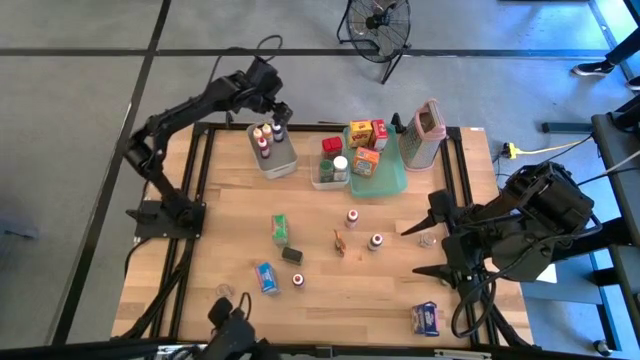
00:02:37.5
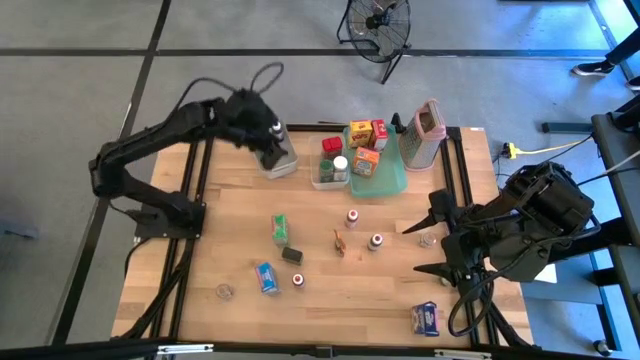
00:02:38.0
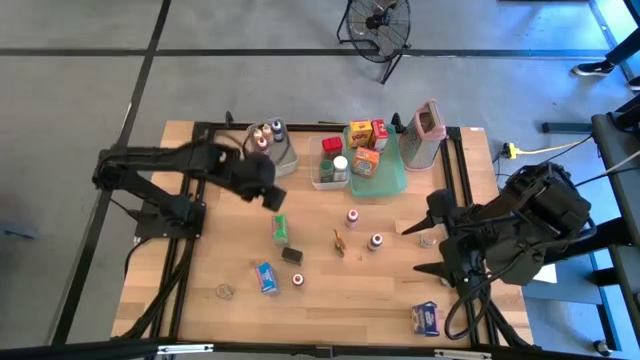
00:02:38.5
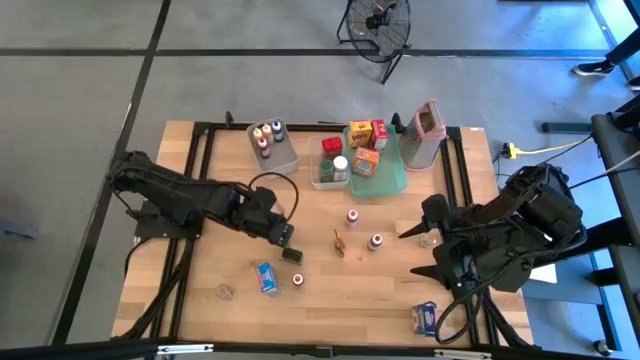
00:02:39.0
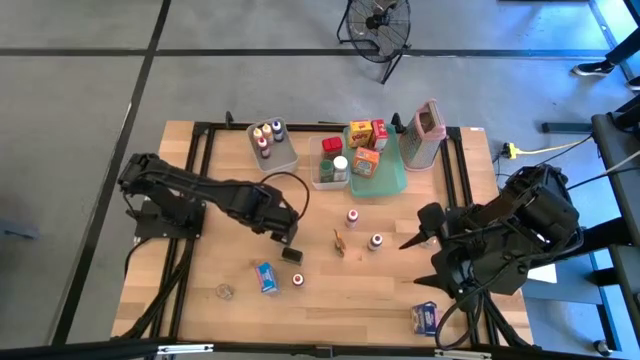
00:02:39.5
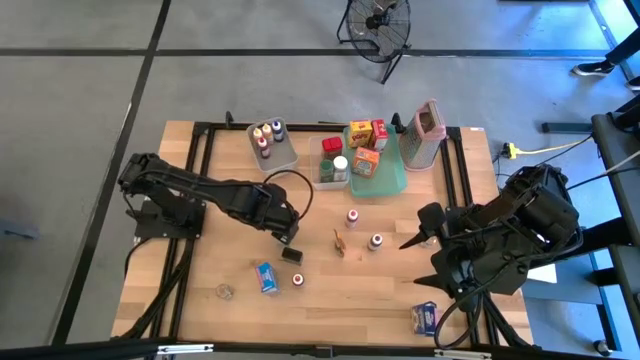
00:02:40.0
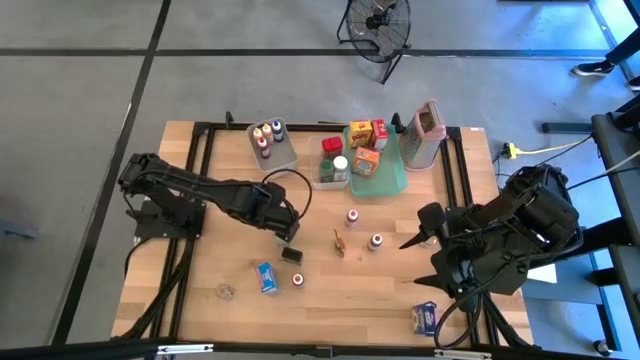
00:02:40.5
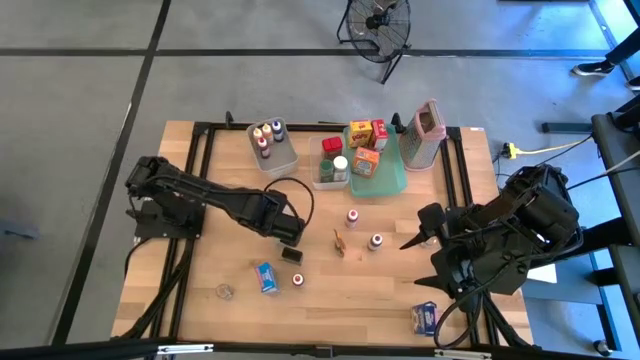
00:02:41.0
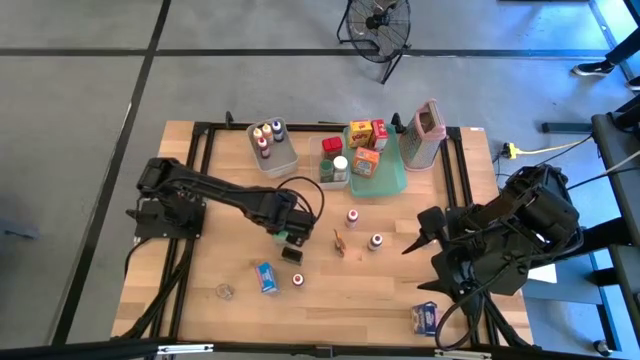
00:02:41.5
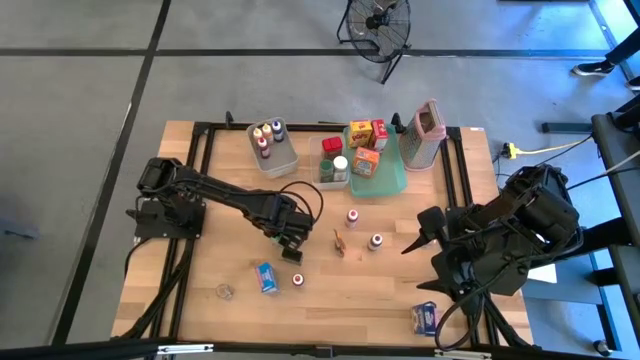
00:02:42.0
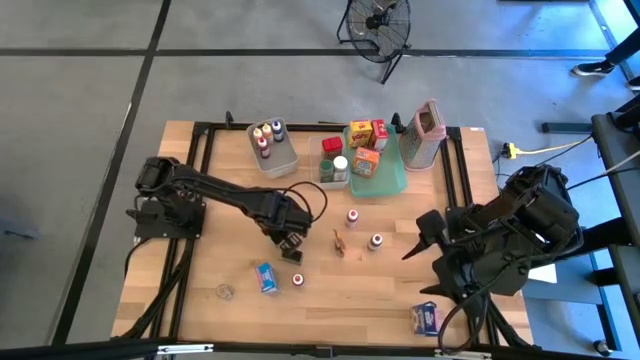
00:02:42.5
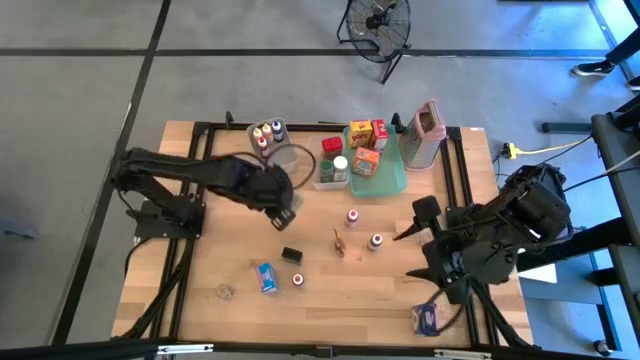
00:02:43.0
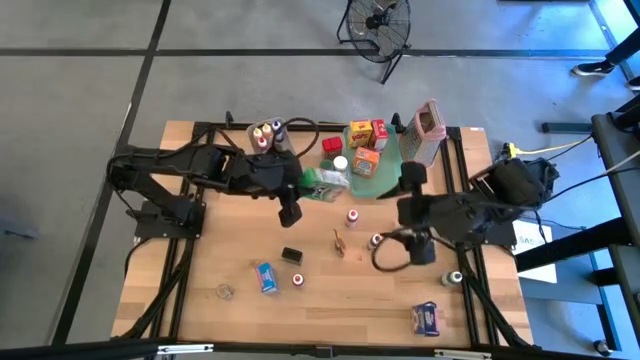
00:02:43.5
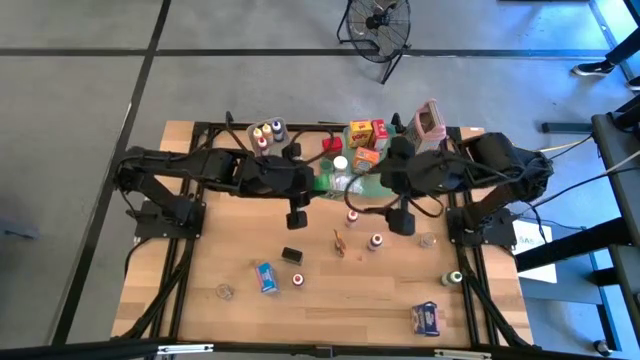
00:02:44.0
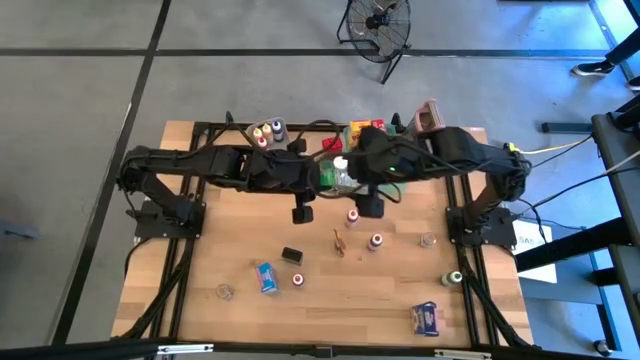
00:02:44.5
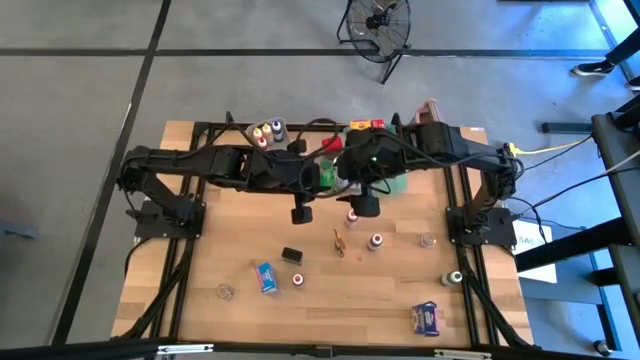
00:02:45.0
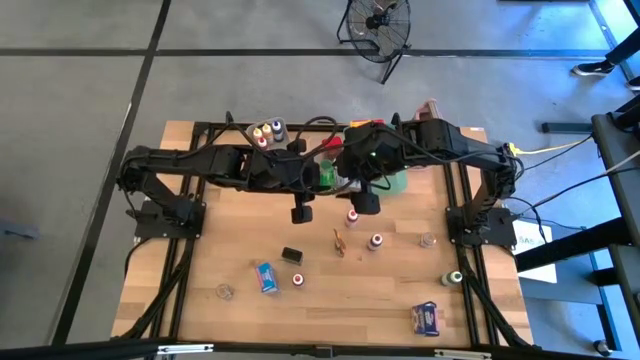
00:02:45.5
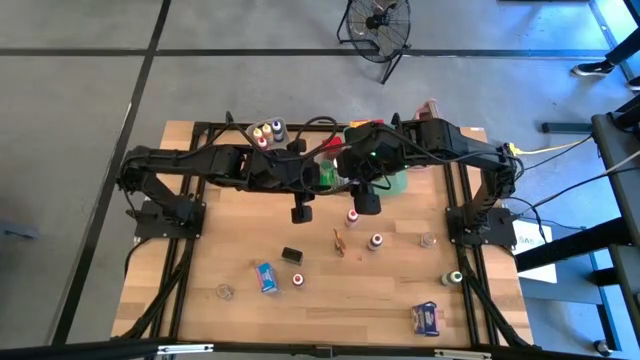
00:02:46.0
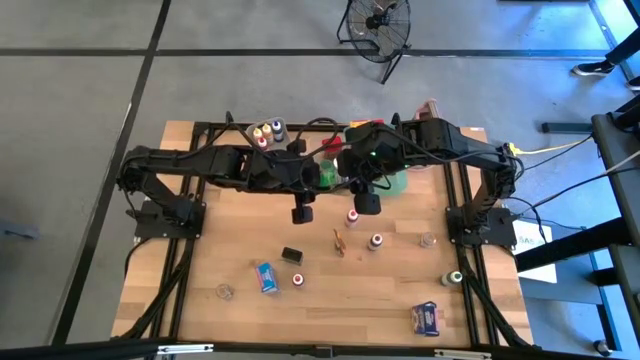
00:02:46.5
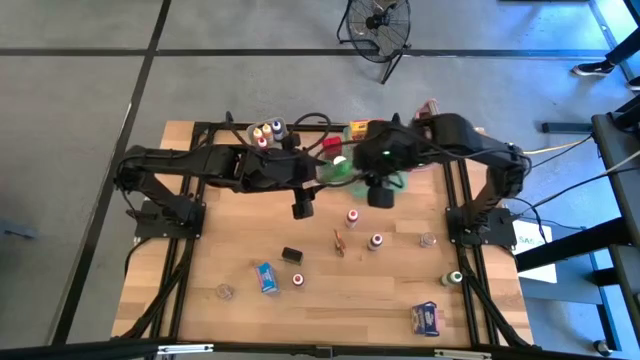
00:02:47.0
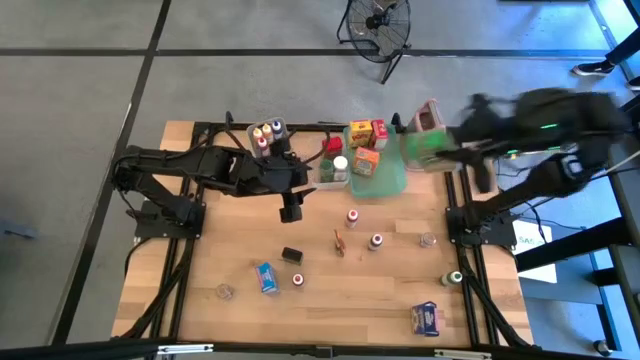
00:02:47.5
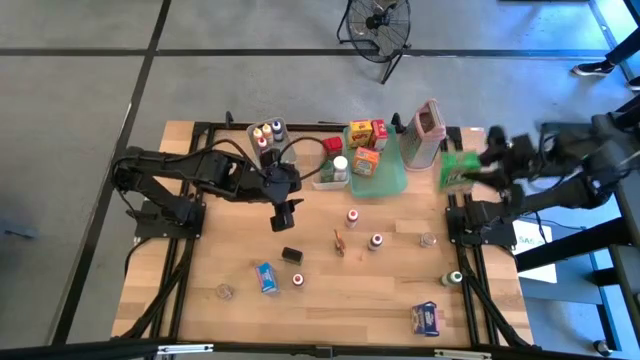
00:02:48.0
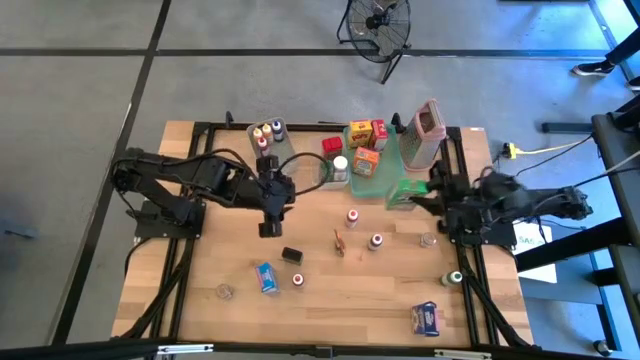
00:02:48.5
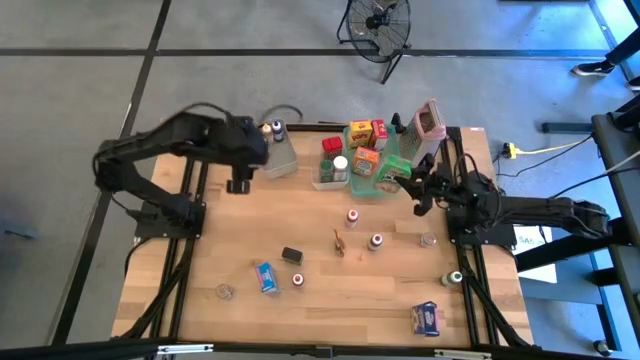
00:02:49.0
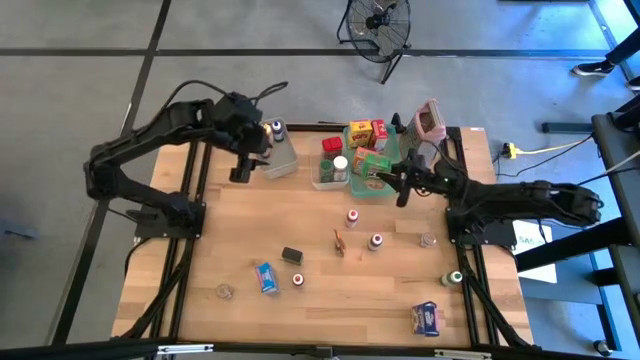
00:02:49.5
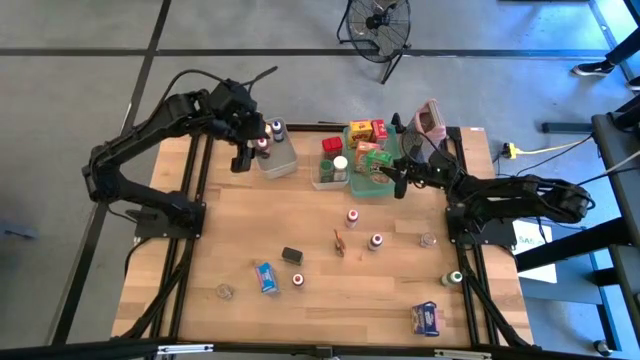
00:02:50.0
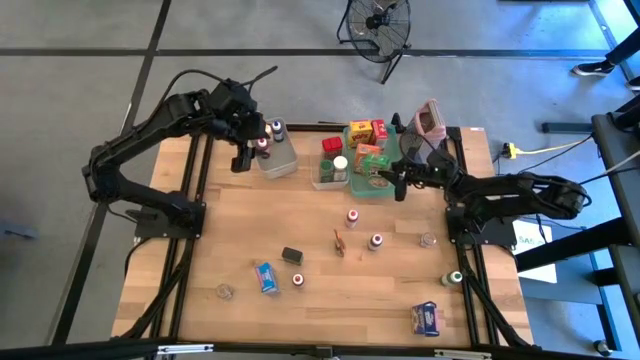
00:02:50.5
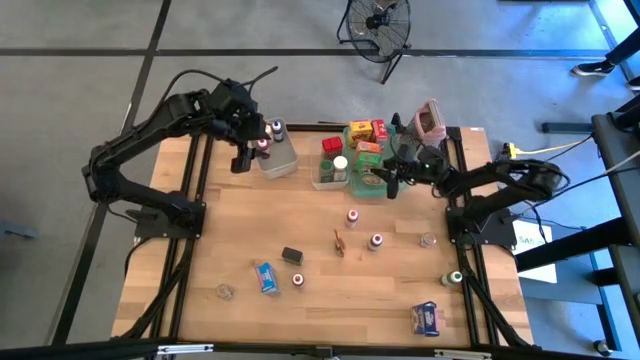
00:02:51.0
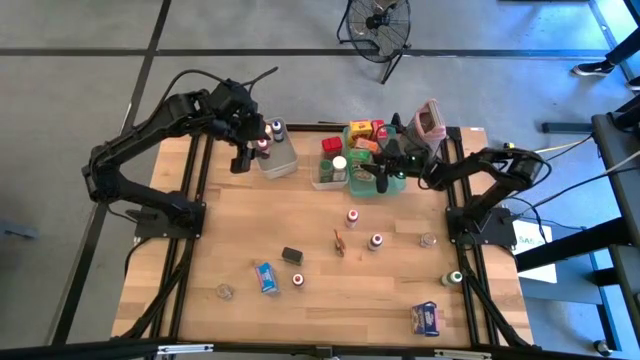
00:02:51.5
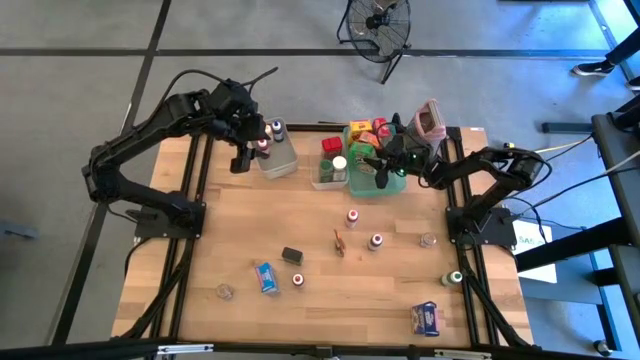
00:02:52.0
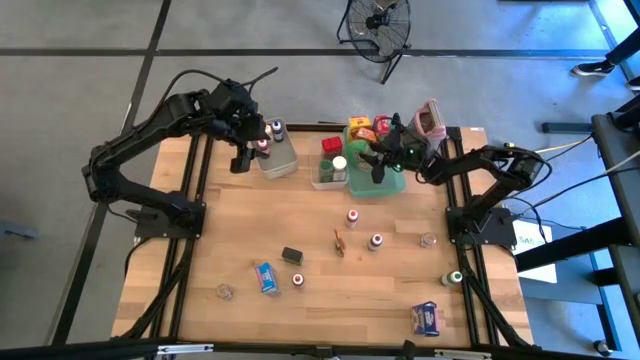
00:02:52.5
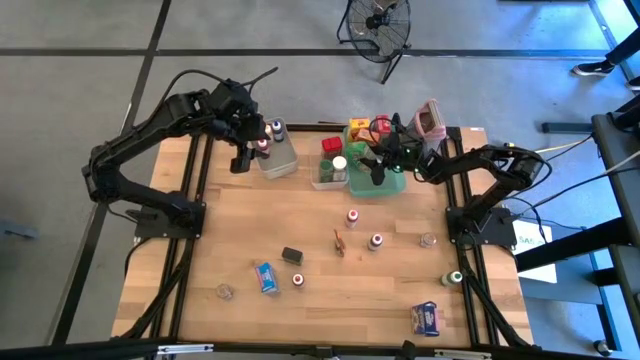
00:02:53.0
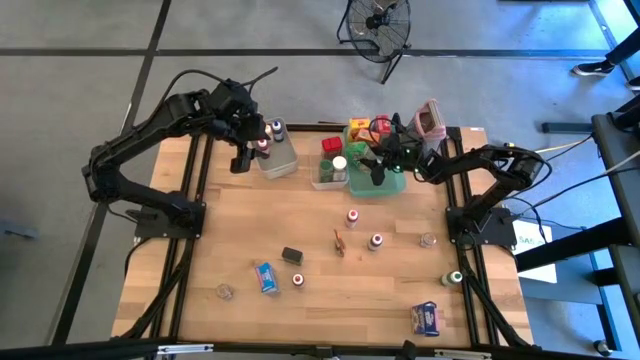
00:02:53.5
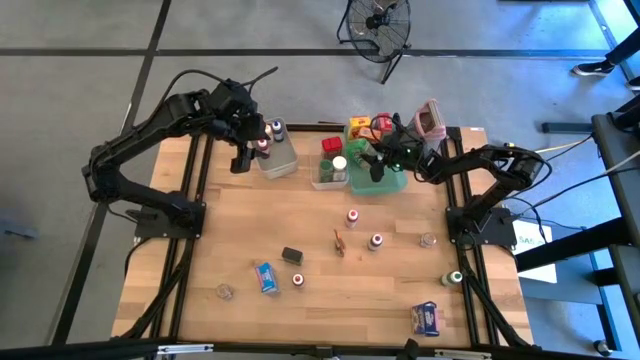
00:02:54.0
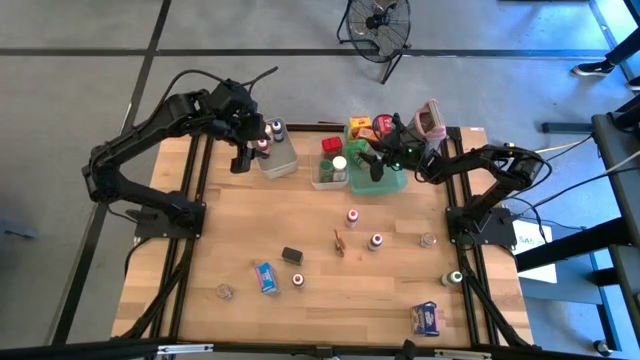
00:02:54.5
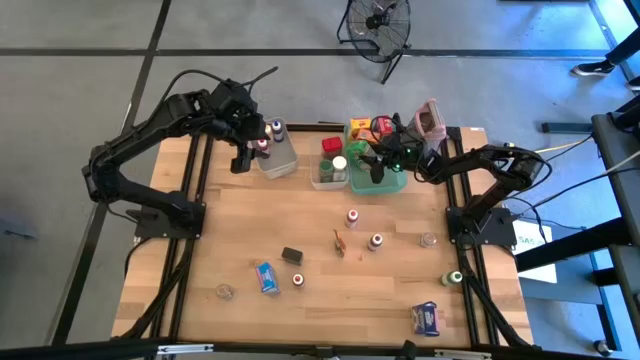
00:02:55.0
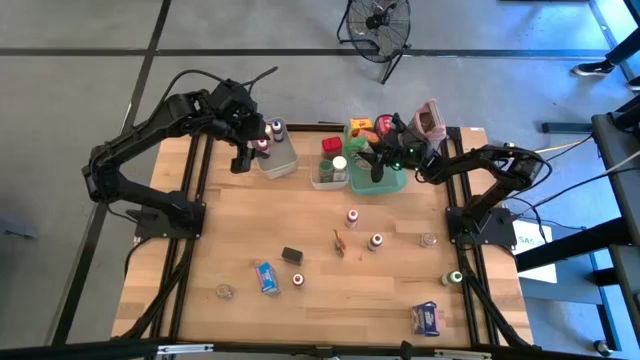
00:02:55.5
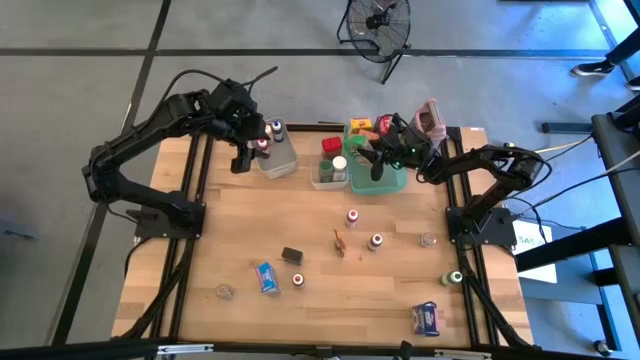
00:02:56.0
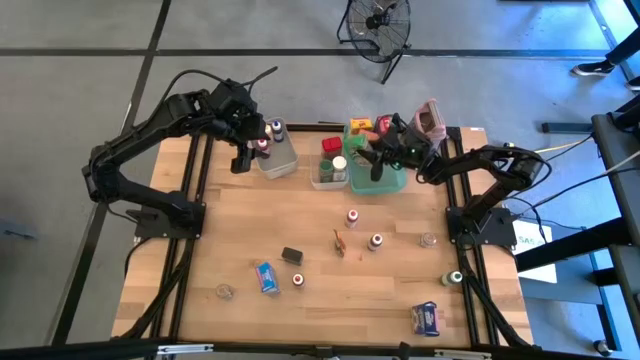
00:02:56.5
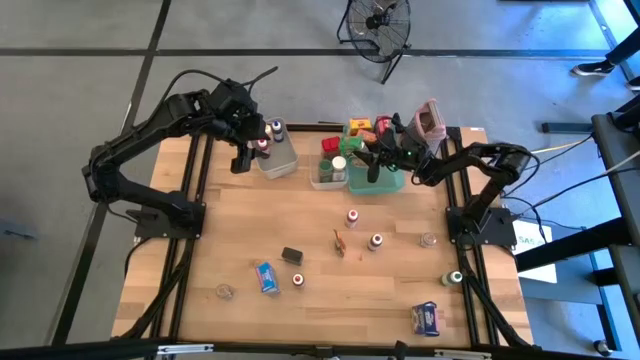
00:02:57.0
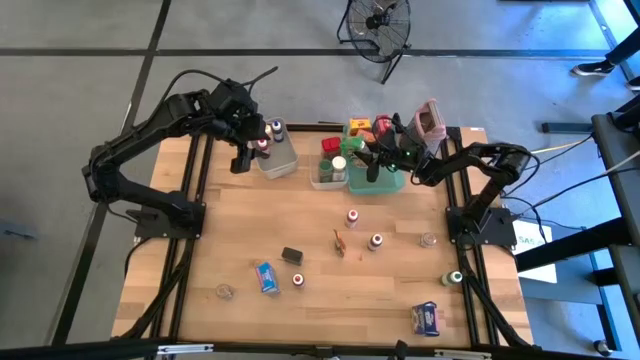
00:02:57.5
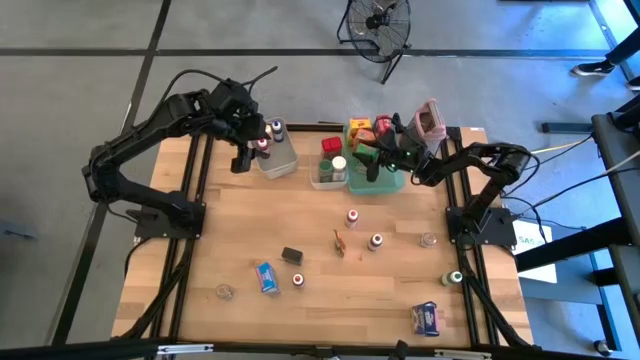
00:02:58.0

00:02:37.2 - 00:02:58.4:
Task: Pick & Place Kitchen Items
Put the green cereal box into the green bin
